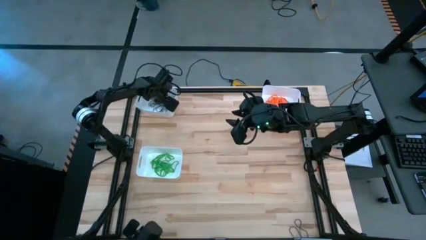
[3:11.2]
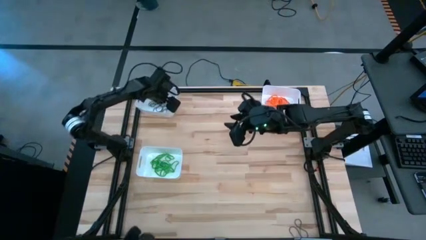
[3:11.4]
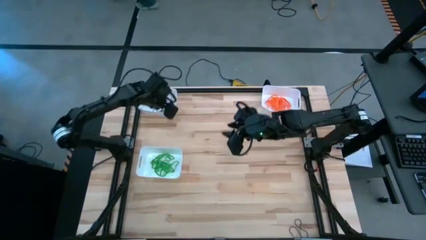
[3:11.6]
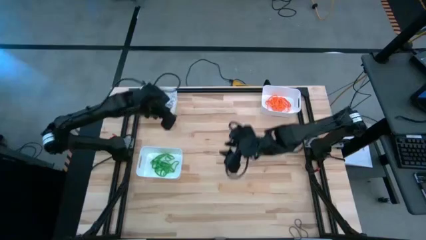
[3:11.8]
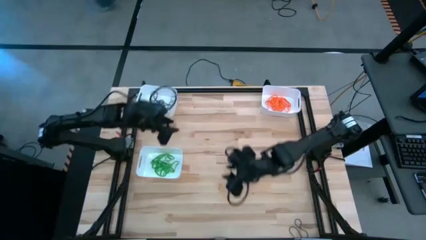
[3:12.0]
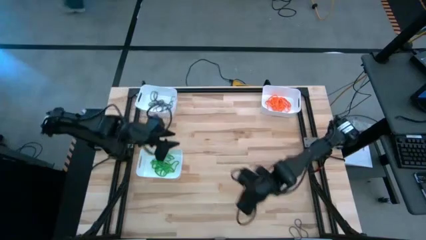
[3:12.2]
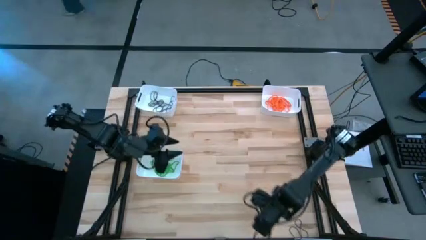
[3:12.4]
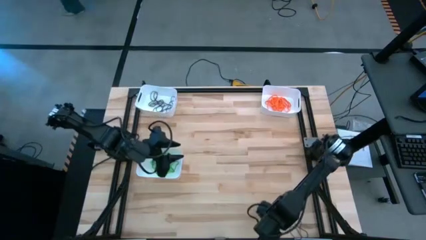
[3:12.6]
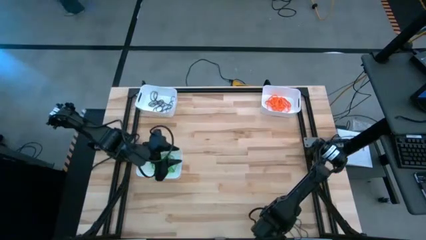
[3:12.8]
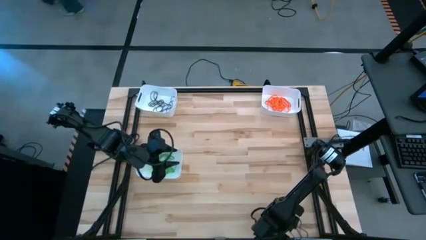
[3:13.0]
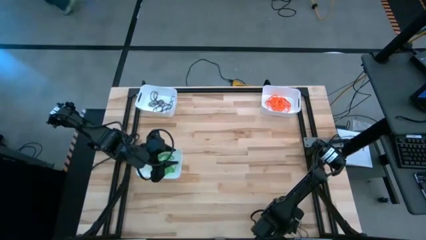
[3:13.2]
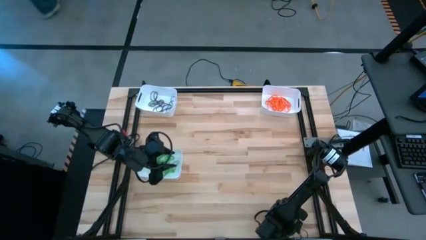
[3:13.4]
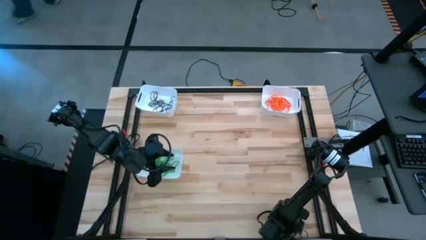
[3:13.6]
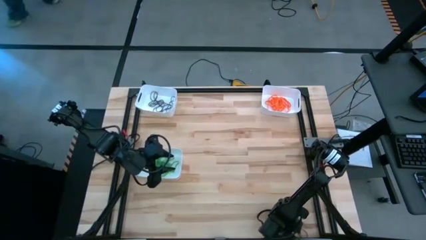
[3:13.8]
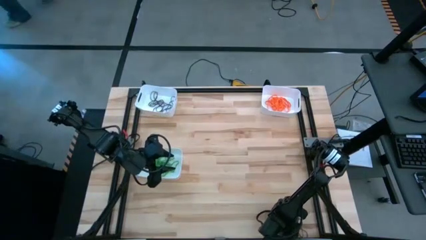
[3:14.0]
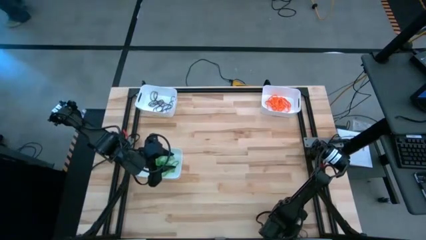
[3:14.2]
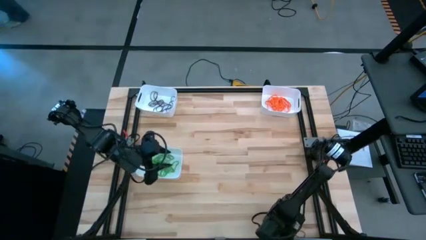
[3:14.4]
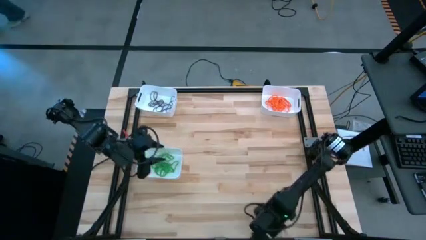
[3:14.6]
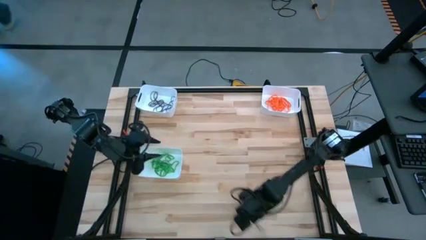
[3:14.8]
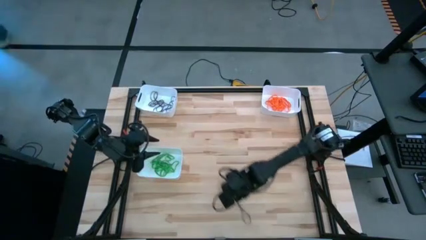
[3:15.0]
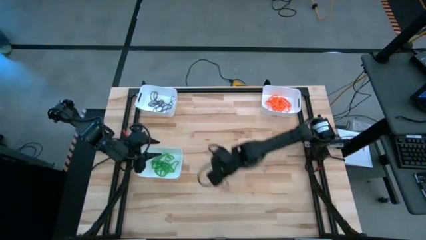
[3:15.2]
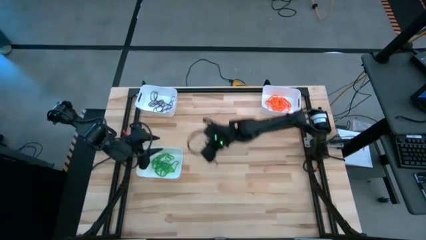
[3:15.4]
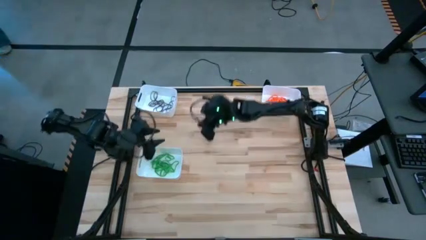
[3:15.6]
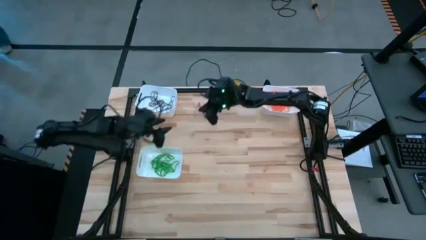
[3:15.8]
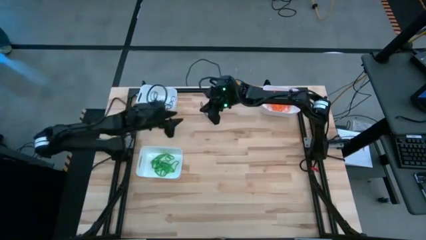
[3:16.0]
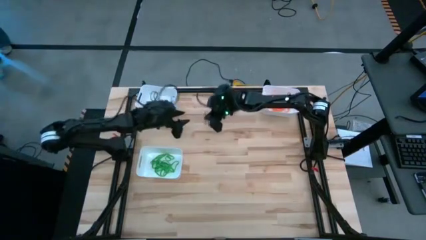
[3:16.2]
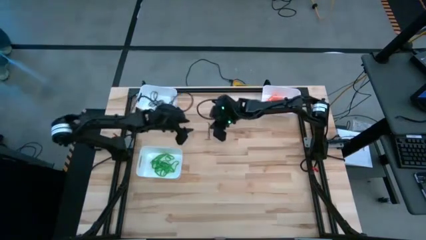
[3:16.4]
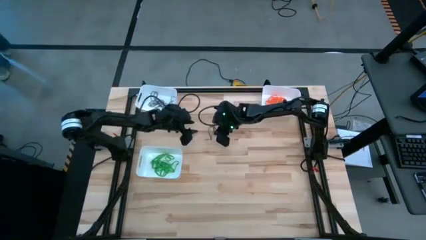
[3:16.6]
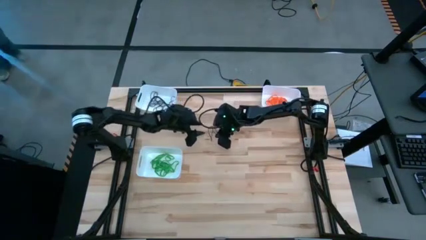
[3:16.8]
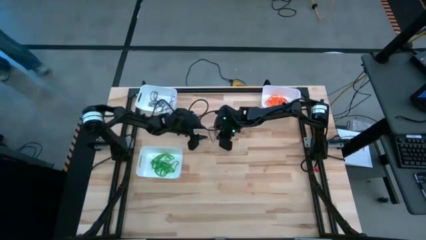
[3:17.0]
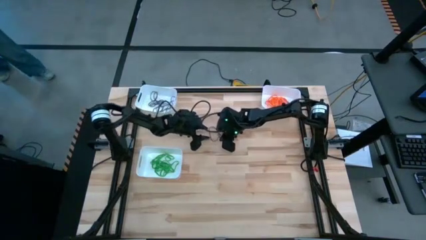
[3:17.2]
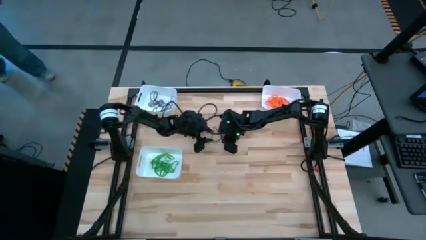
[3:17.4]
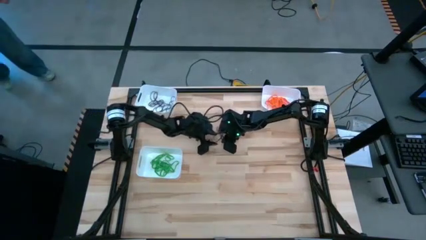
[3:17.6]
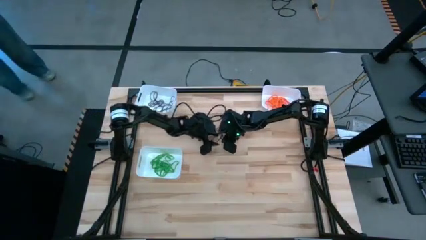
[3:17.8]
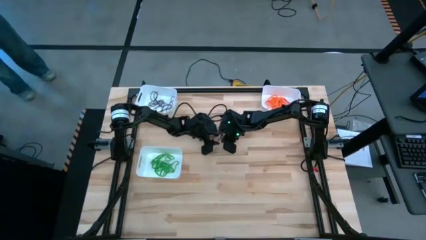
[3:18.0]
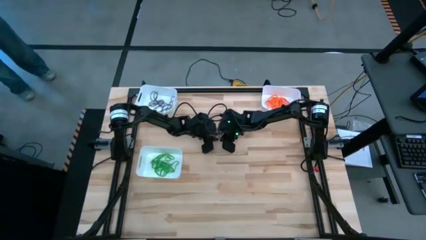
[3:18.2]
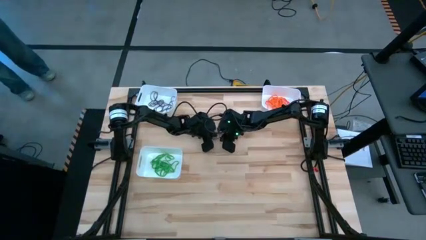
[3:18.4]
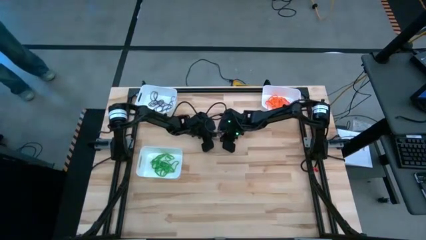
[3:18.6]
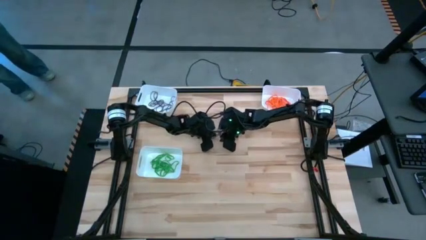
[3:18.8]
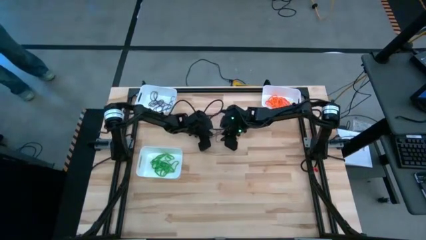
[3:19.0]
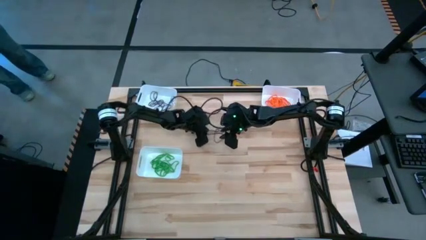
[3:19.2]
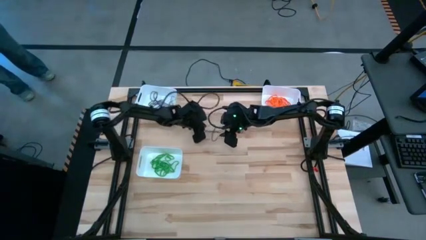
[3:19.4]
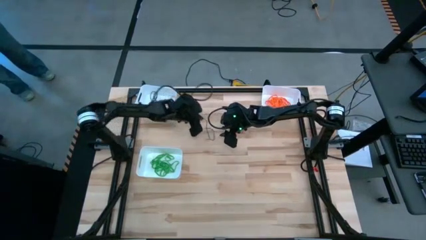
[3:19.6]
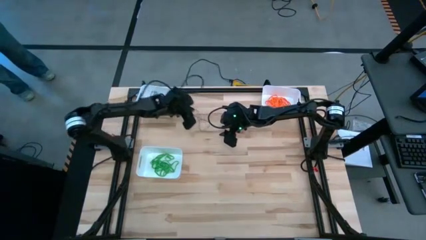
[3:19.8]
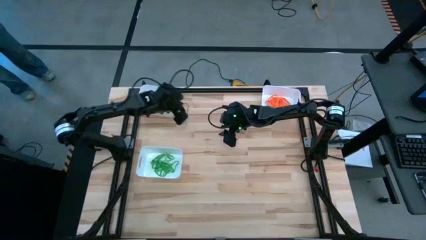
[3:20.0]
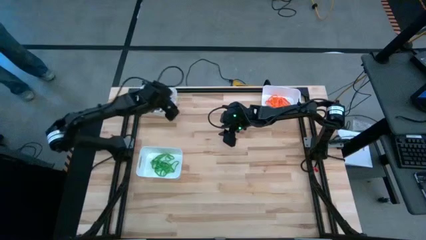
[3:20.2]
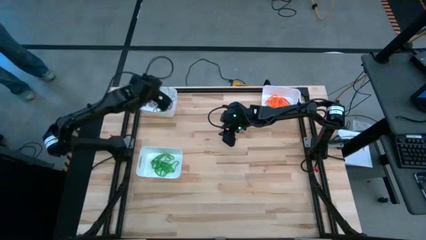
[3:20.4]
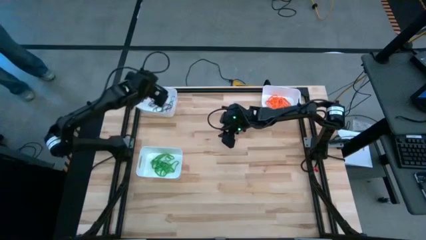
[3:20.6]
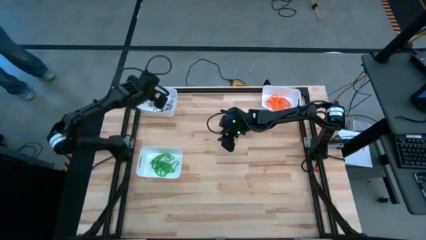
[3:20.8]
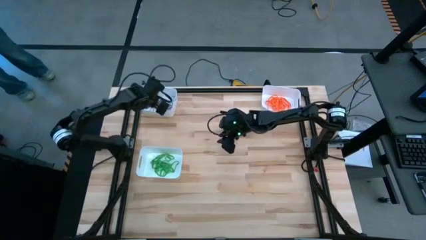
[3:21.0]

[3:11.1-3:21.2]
Task: Sort rubber bands into baskets
Put the purple rubber band into the top left white bin

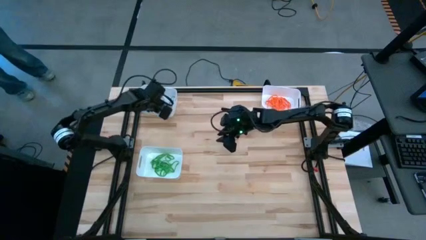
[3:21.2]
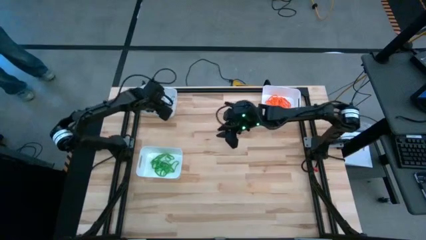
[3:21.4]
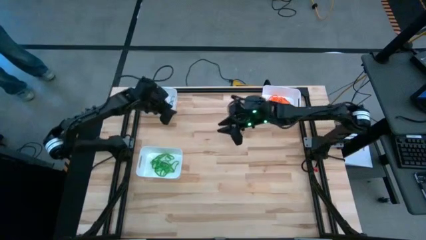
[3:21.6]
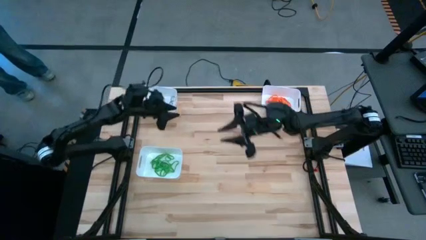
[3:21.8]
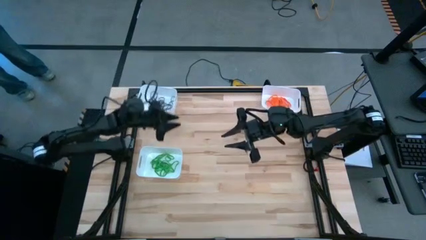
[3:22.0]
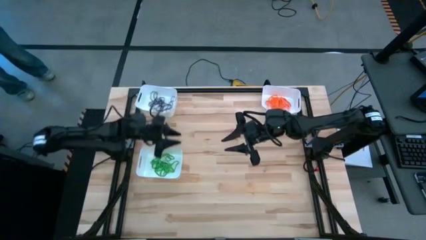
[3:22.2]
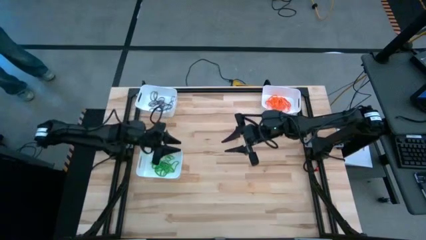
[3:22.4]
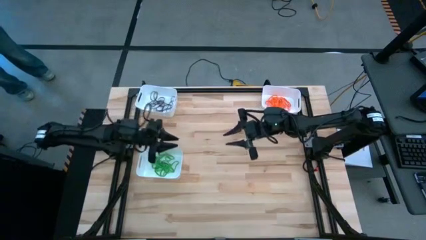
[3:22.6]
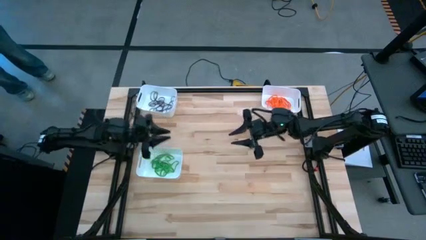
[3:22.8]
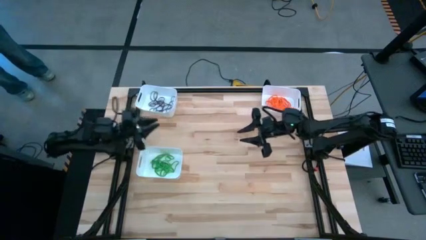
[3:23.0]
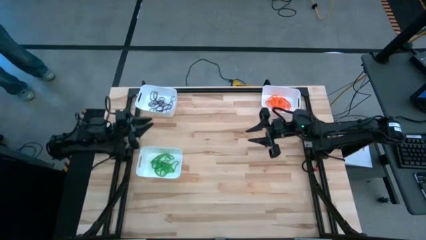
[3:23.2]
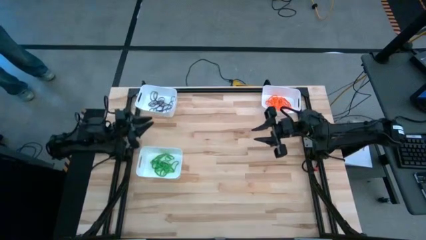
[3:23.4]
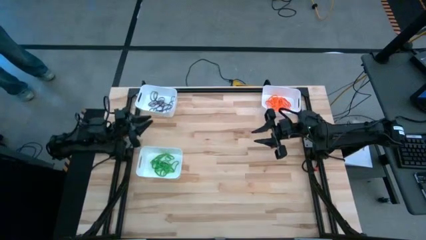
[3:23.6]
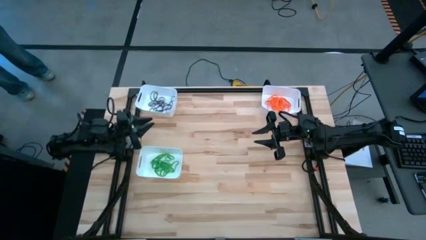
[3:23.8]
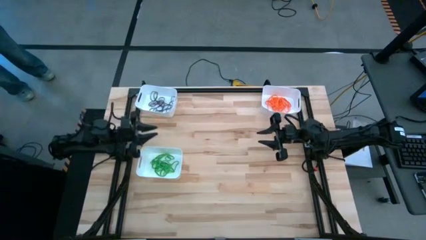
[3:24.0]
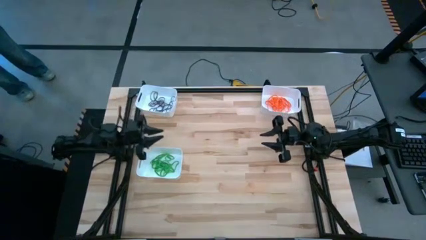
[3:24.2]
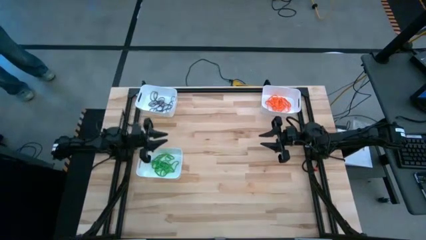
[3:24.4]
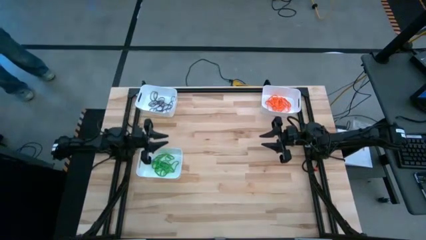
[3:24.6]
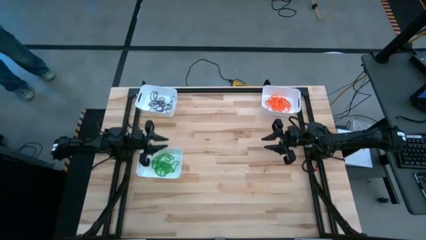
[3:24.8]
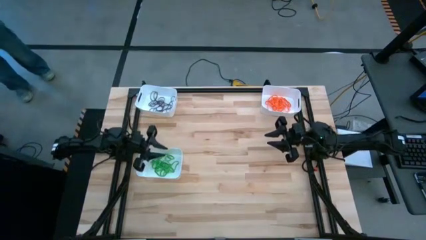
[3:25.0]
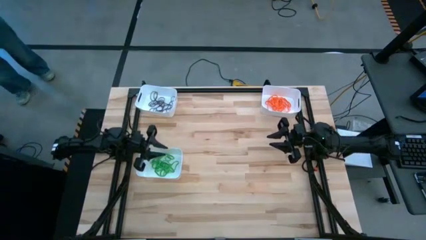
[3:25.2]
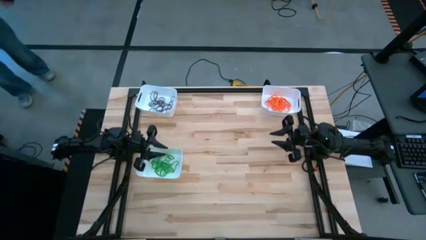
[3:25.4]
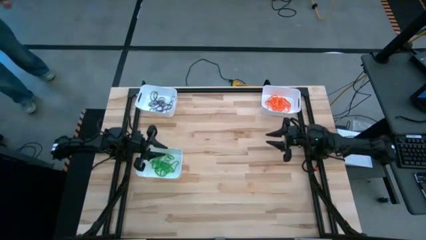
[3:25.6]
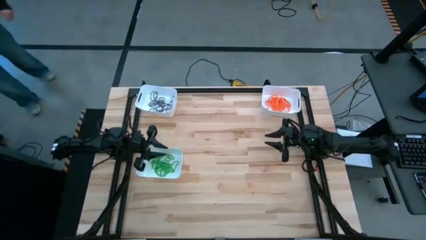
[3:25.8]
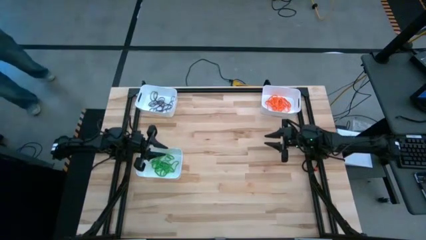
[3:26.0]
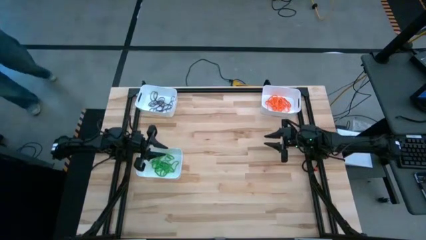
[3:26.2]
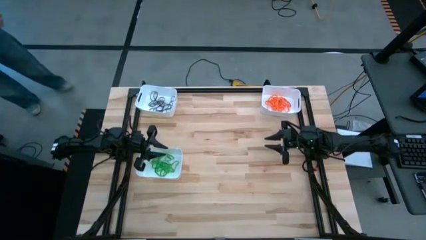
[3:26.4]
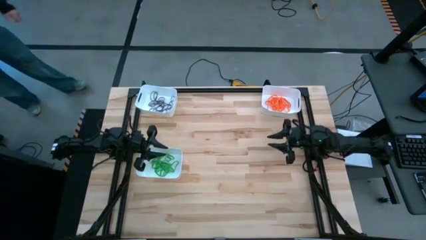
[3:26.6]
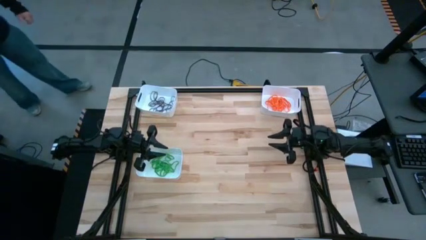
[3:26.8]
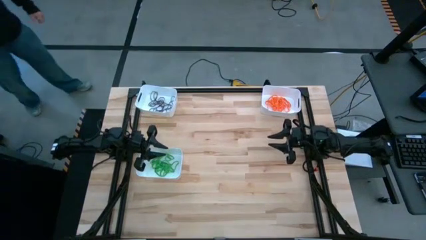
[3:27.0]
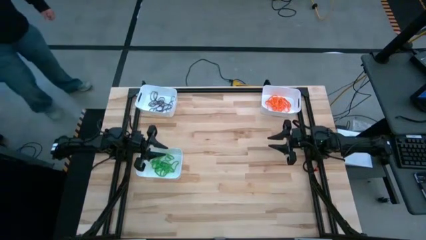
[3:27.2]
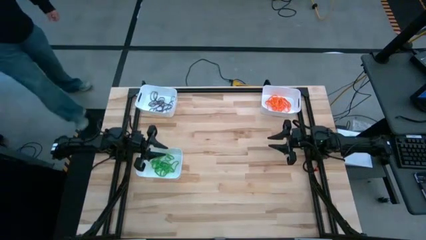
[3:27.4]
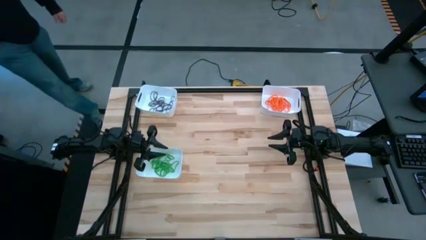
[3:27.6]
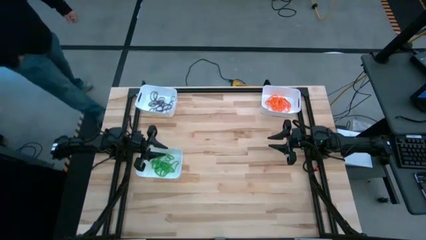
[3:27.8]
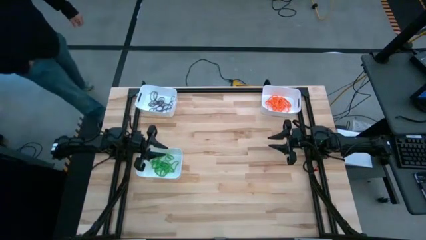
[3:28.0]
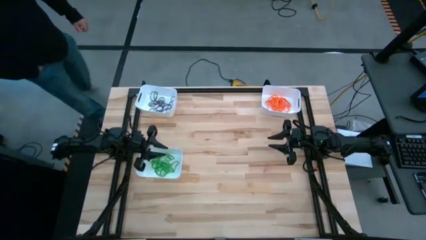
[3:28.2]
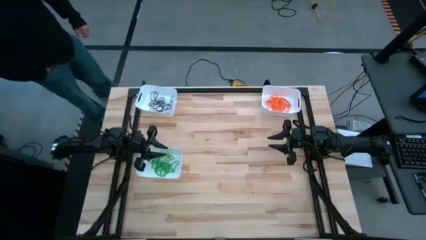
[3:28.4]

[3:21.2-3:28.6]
Return to Home Position
